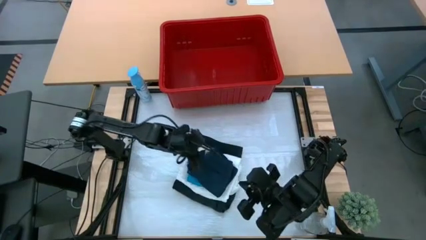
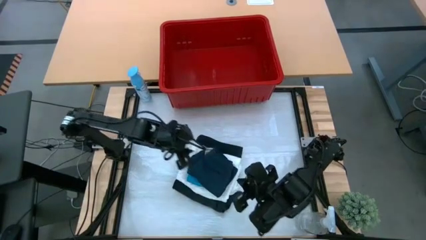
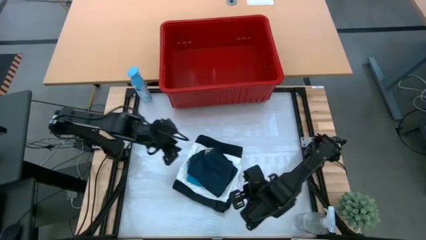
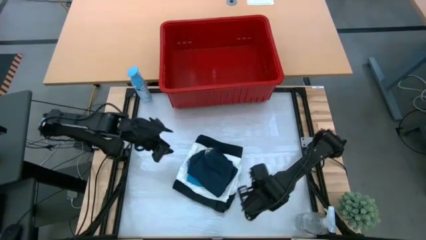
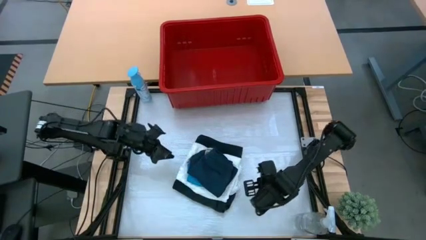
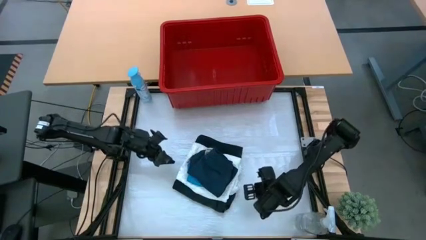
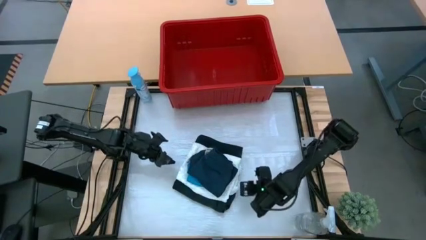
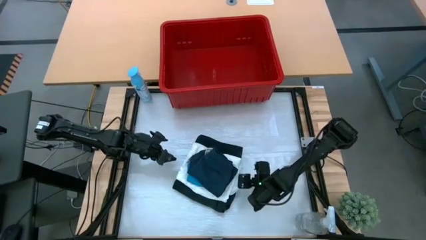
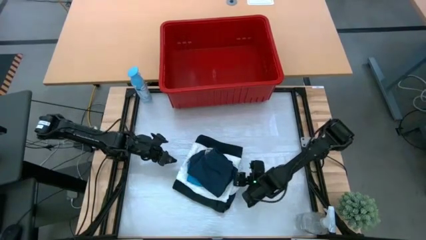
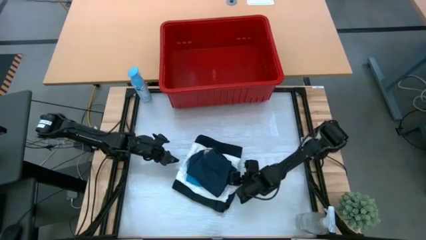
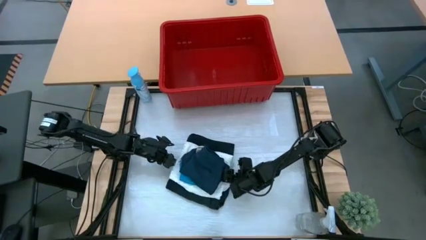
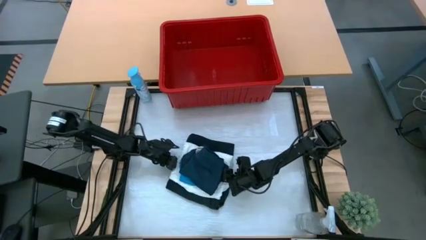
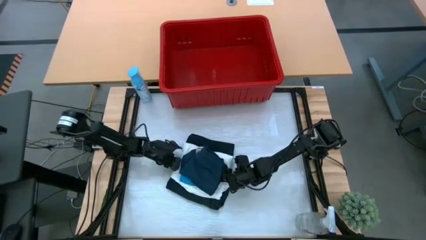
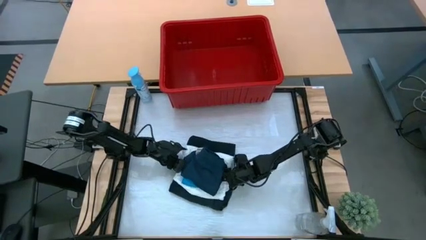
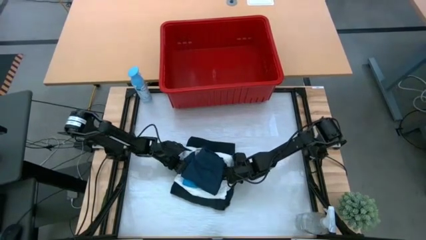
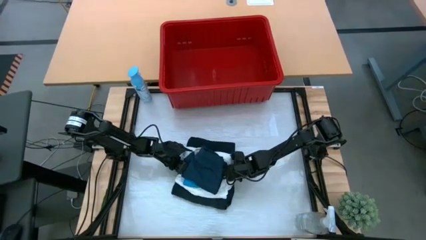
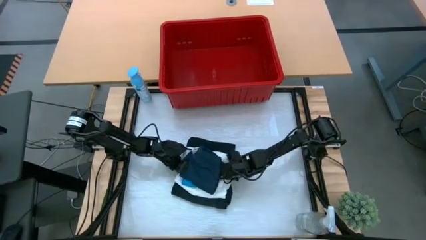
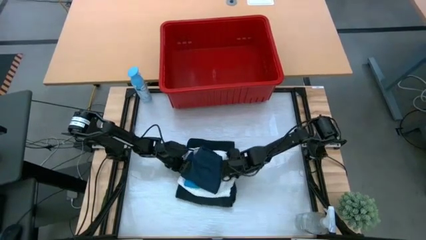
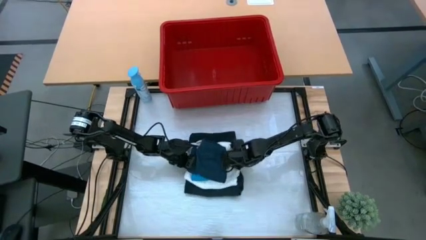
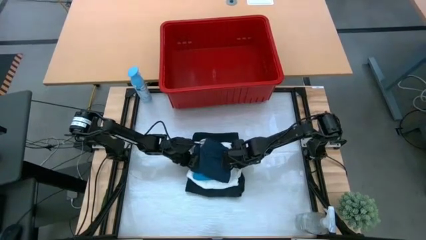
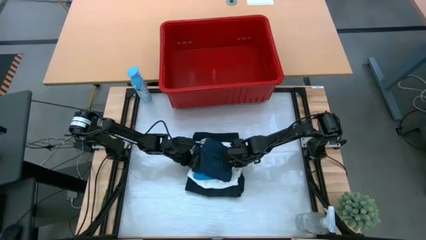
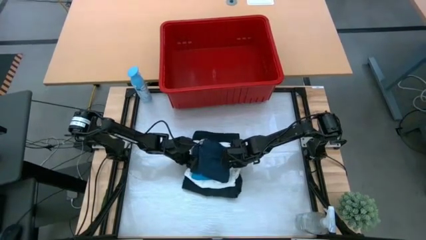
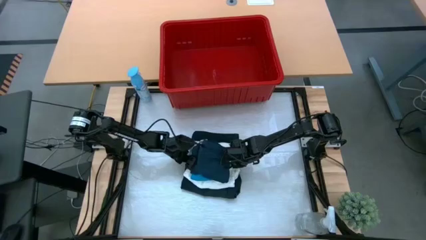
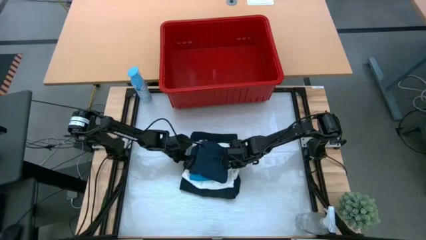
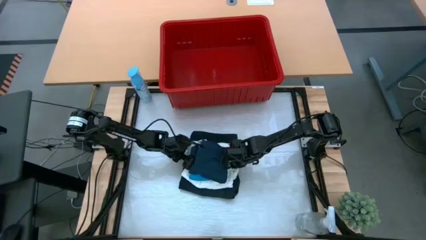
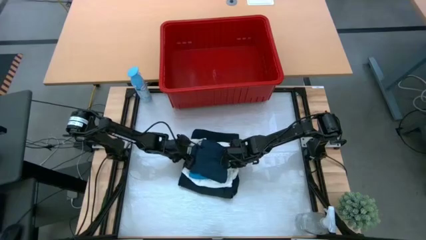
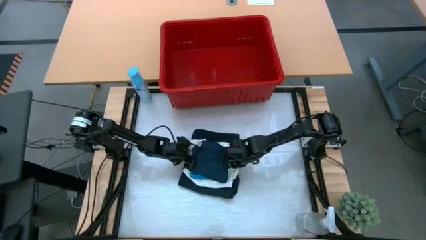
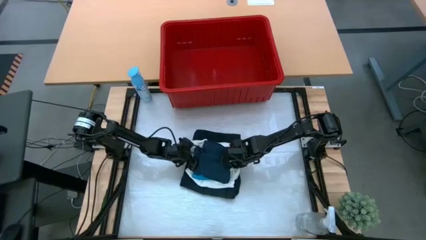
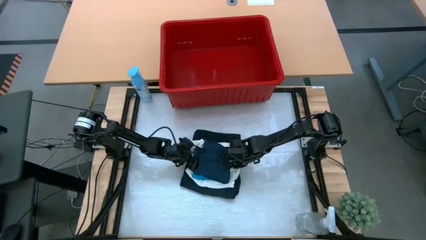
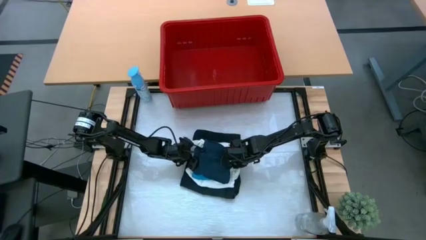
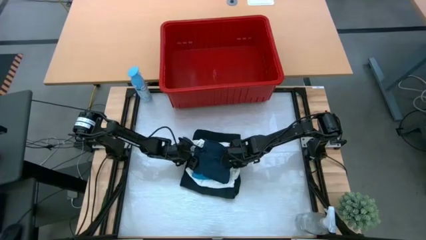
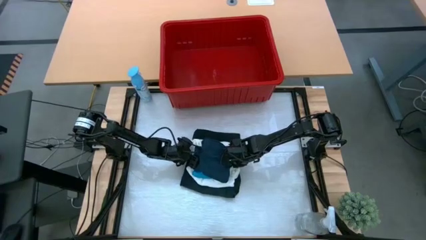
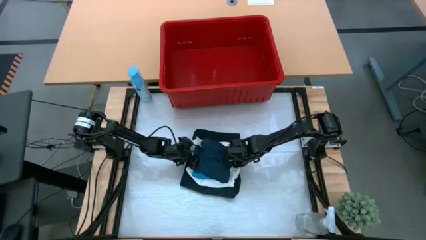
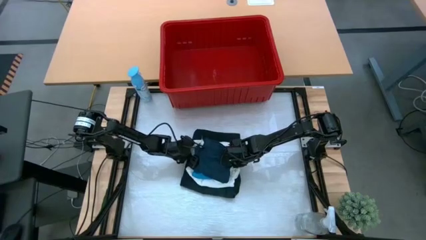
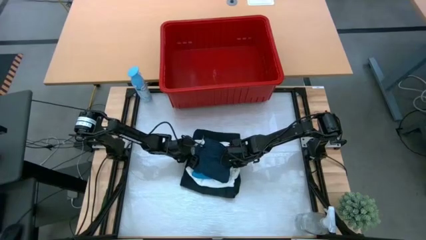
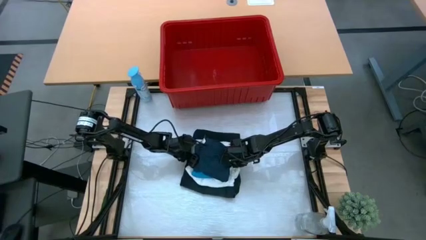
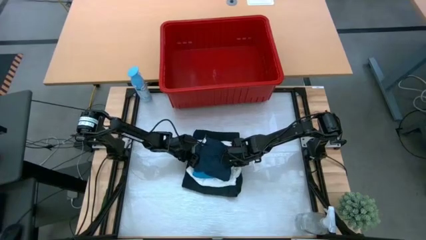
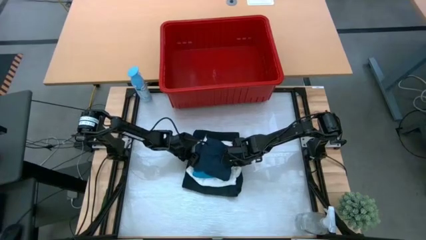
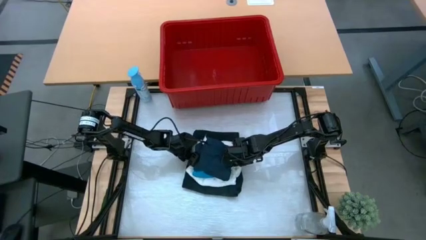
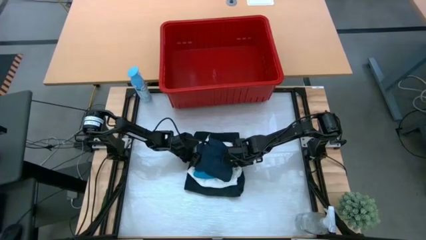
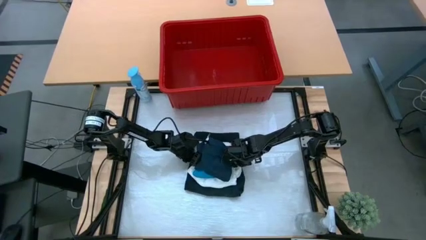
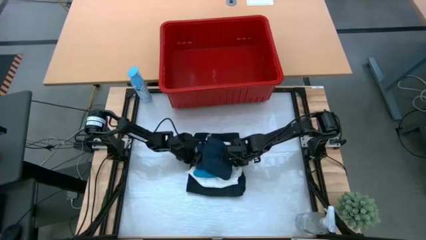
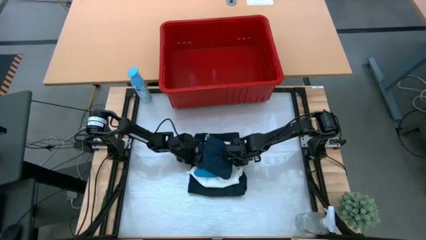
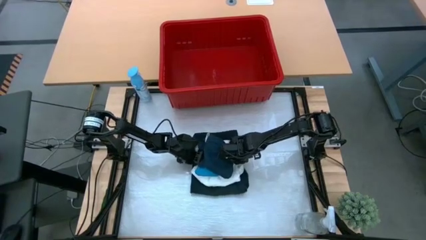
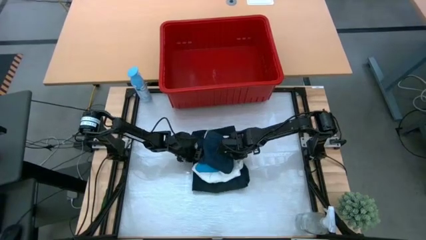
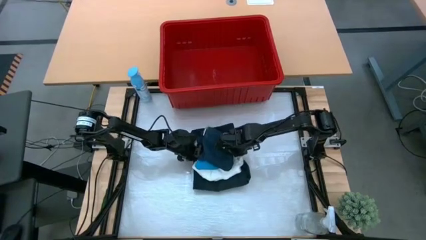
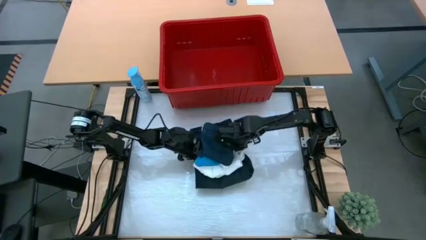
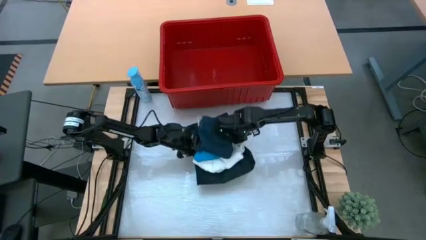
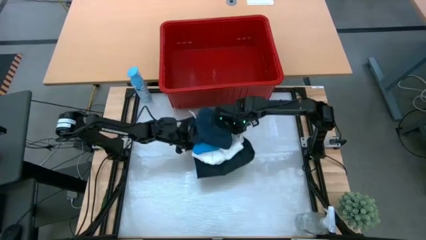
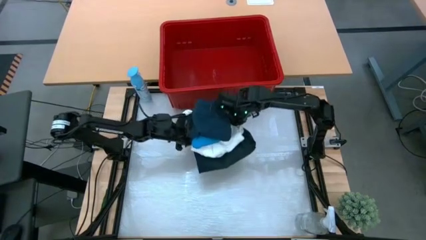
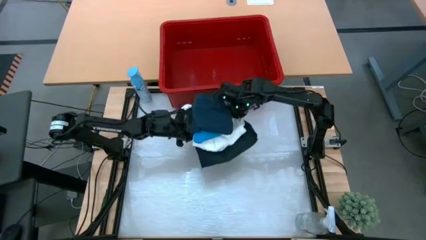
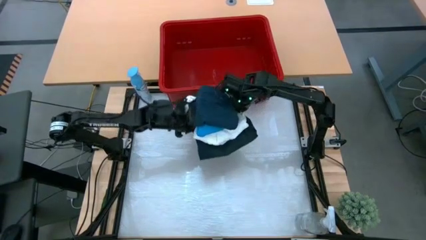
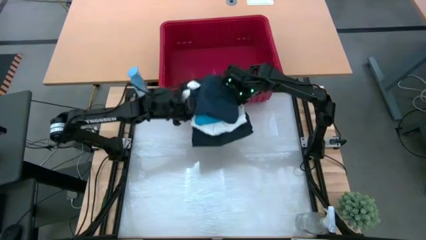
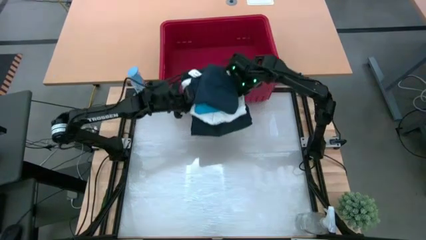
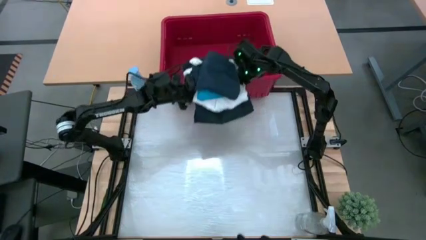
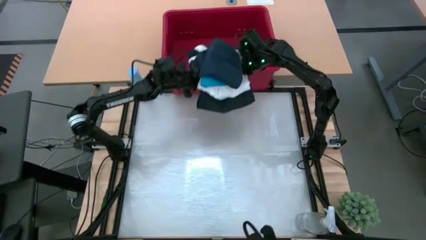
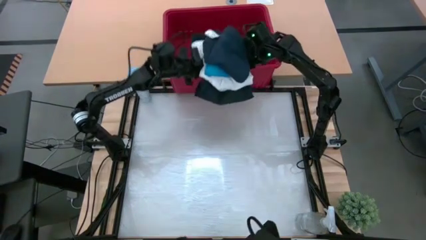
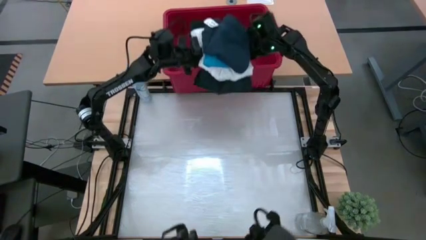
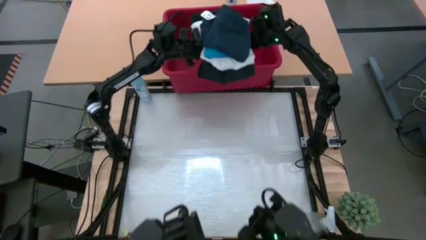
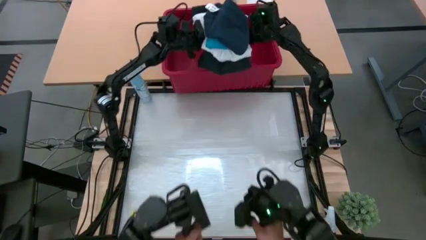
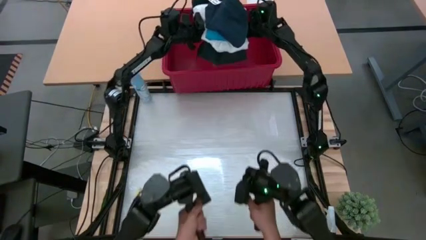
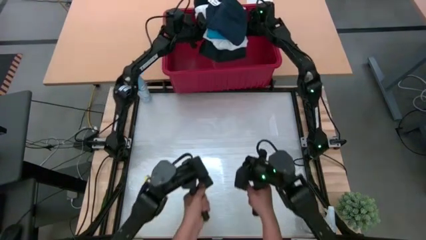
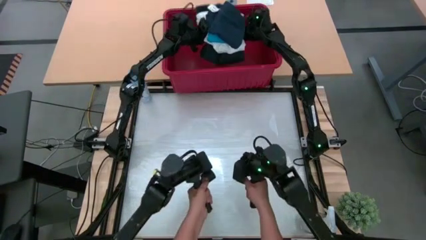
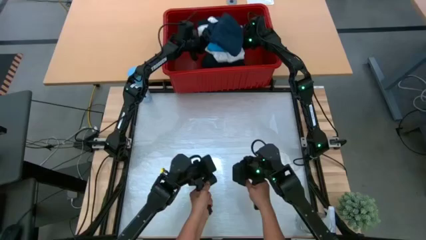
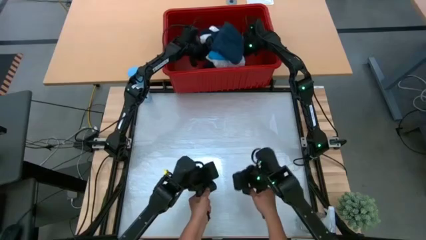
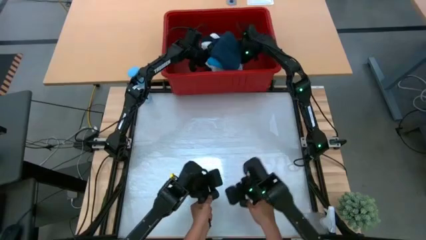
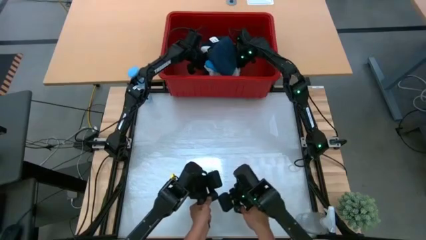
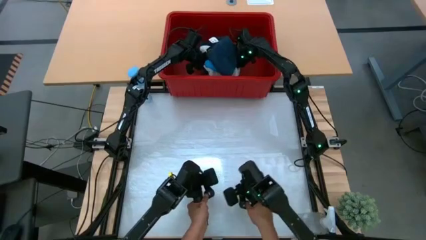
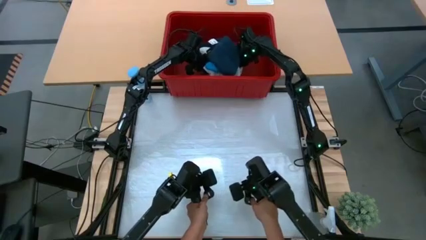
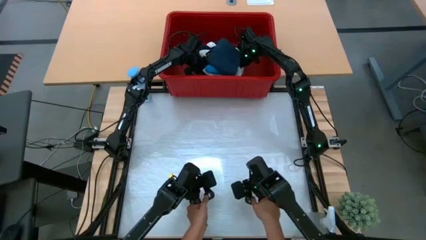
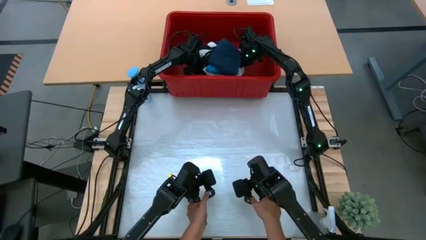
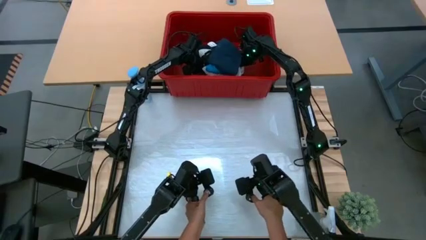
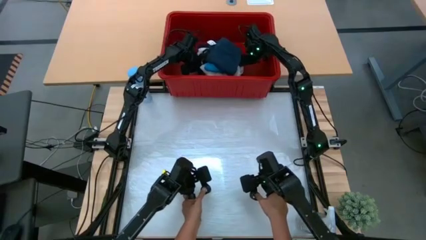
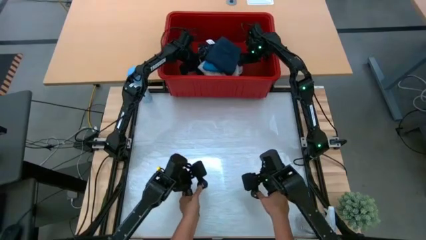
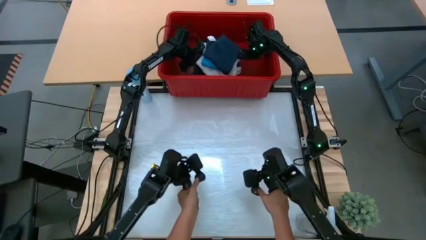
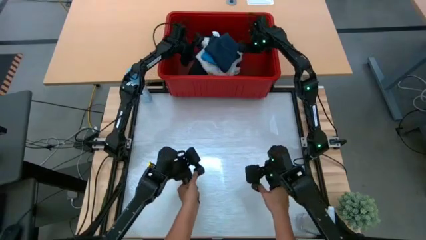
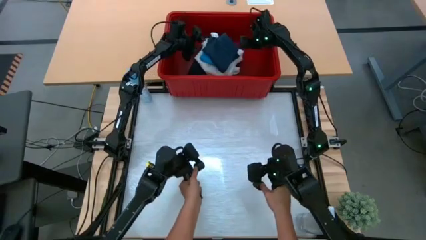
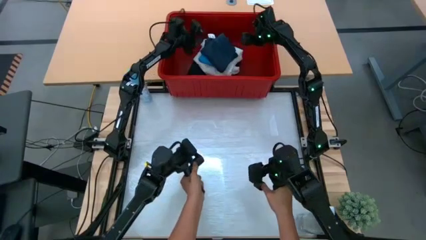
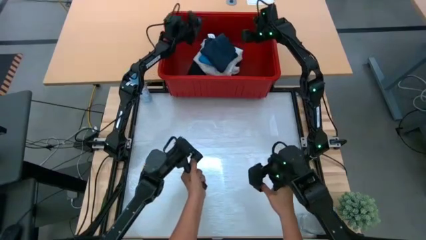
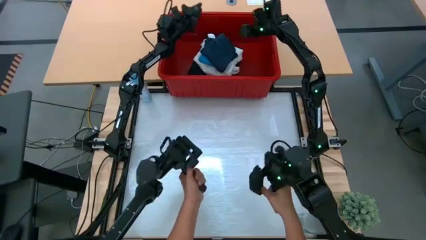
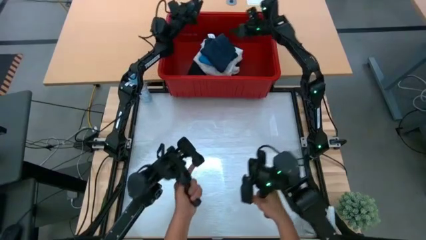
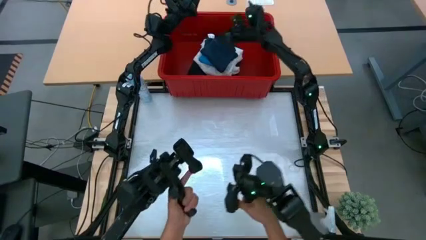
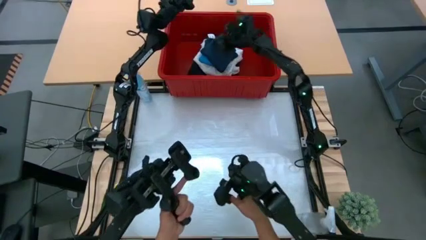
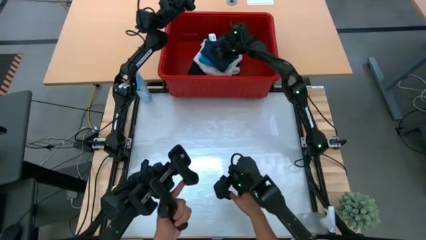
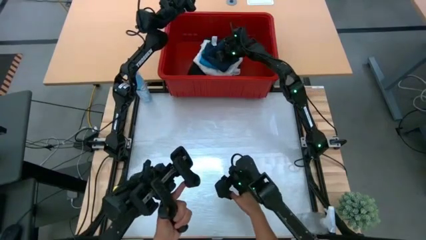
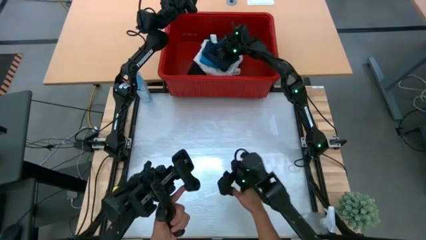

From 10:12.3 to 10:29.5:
Task: Fold Laundry from Bin
Put the stacked clothes into the red bin
